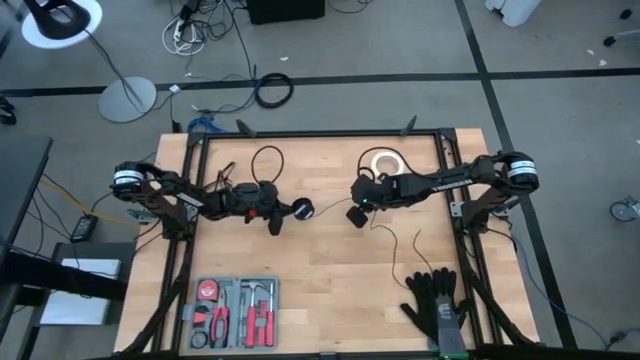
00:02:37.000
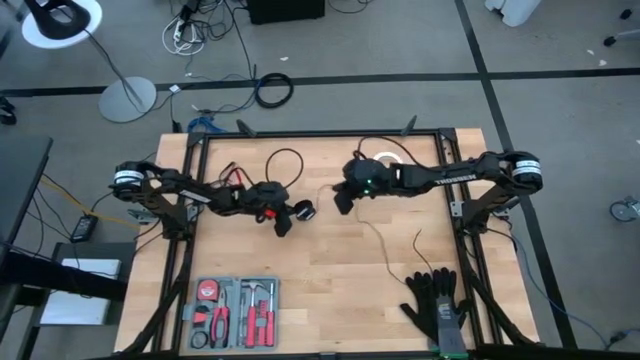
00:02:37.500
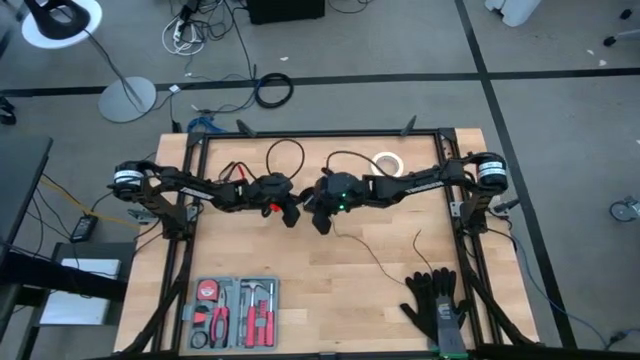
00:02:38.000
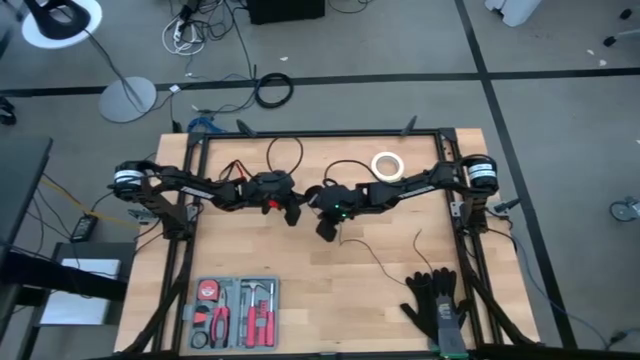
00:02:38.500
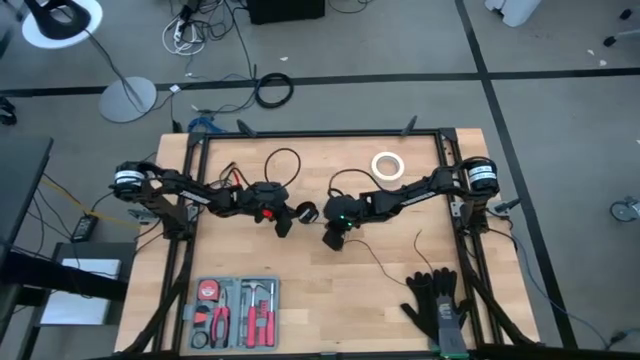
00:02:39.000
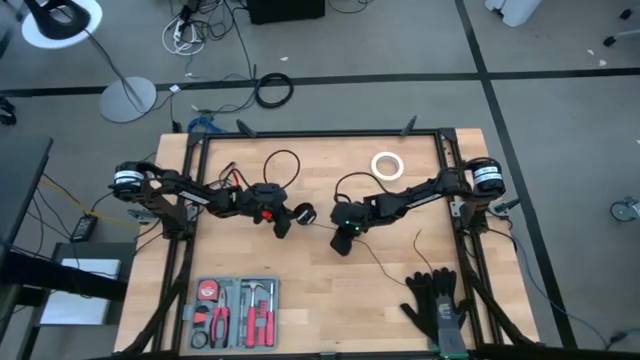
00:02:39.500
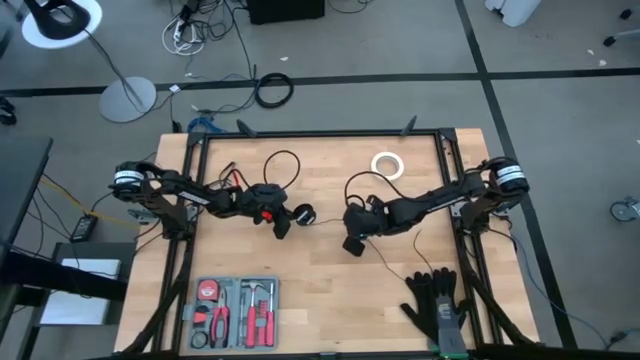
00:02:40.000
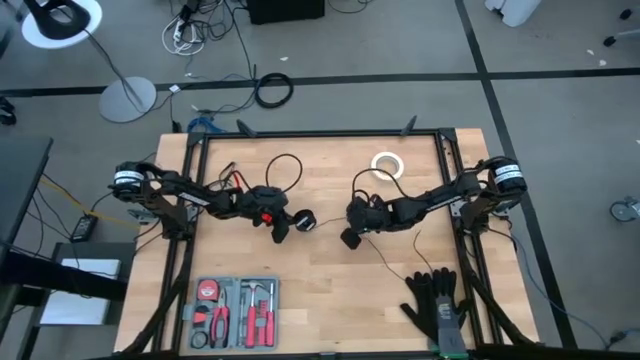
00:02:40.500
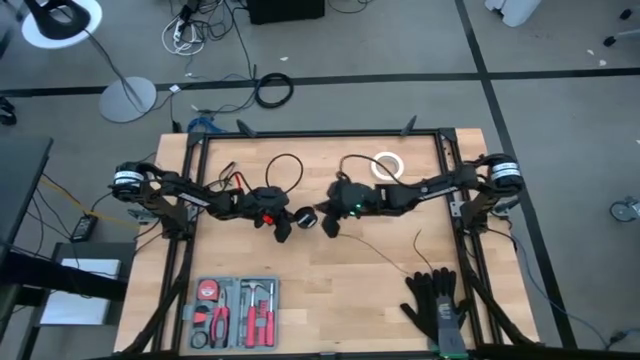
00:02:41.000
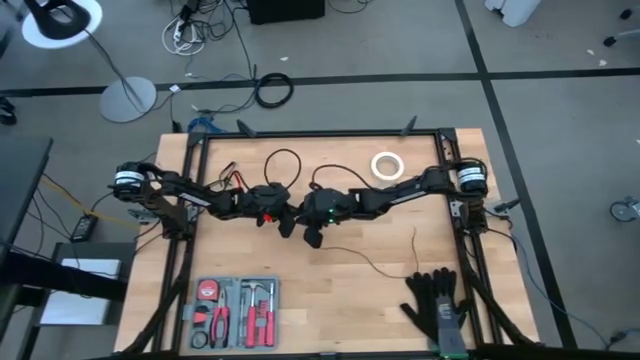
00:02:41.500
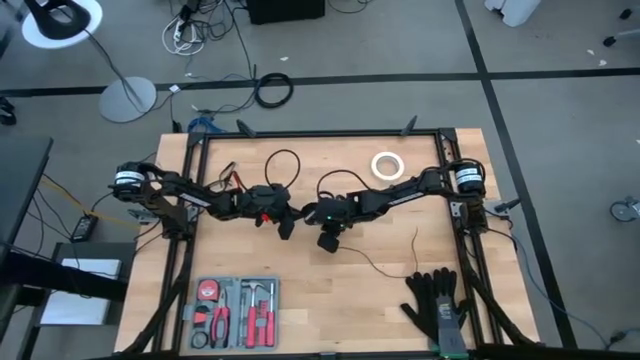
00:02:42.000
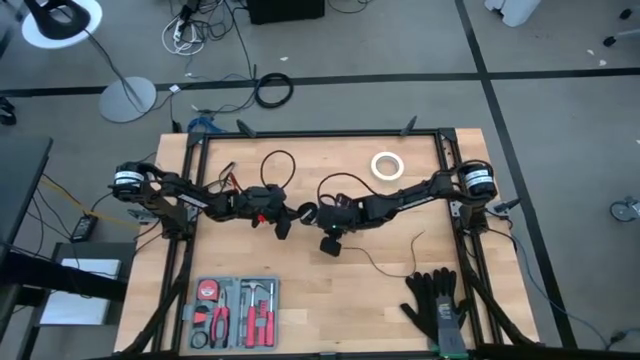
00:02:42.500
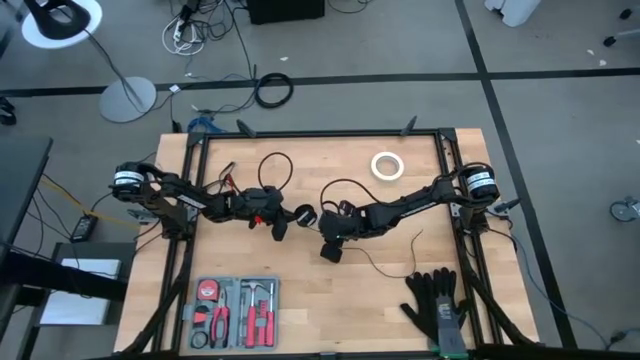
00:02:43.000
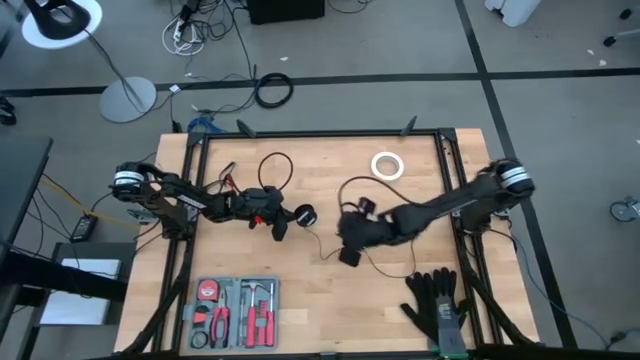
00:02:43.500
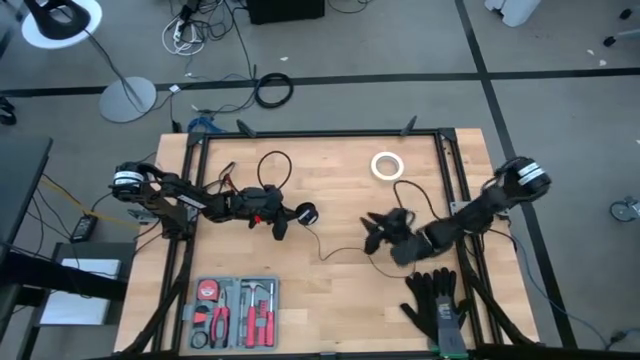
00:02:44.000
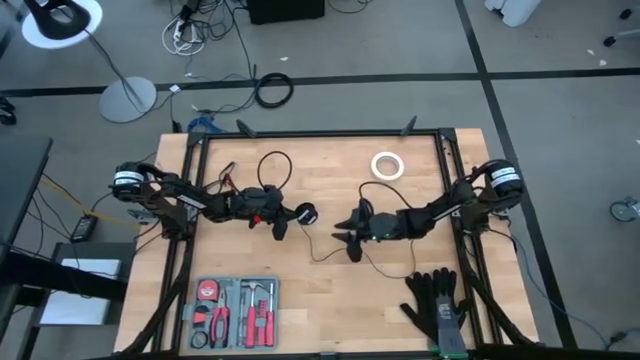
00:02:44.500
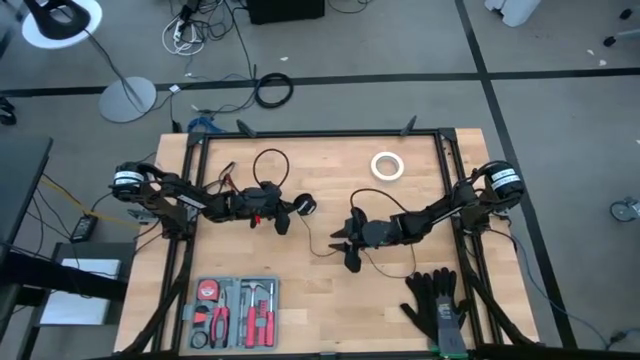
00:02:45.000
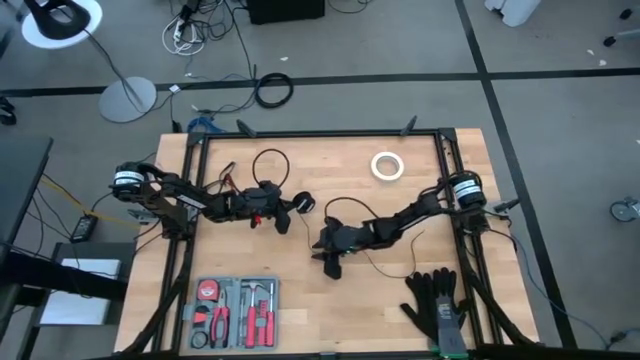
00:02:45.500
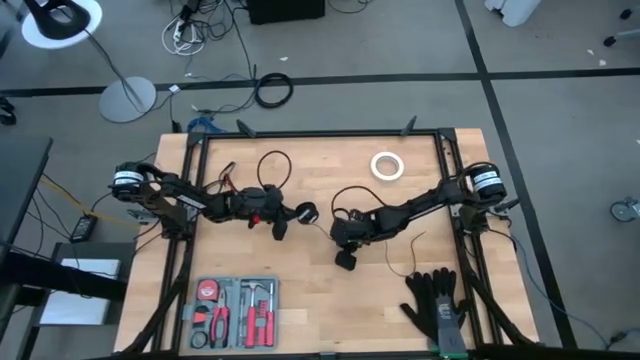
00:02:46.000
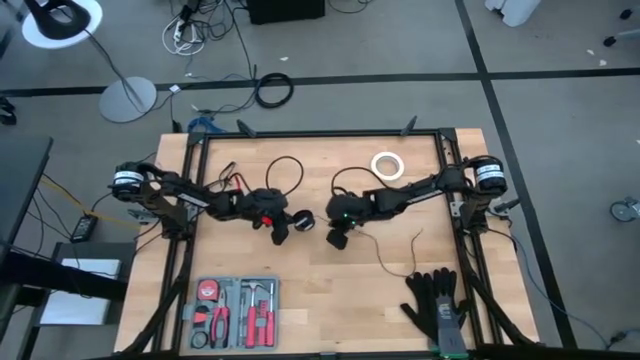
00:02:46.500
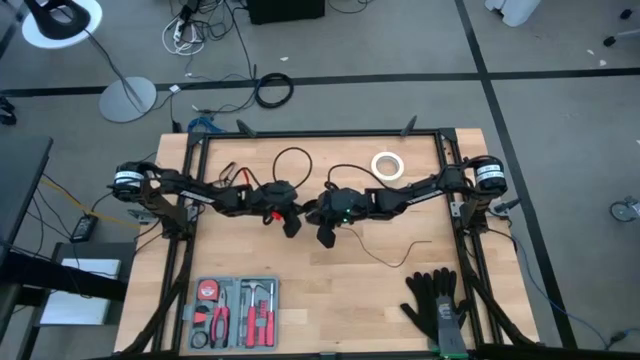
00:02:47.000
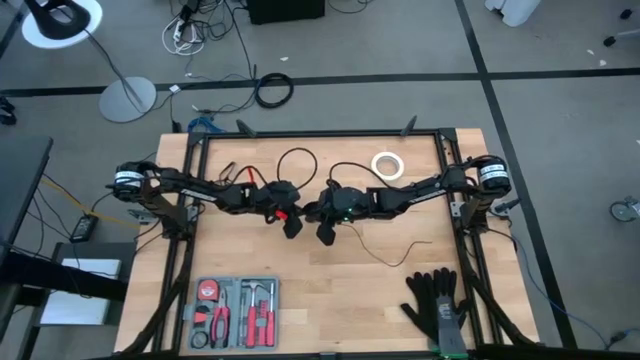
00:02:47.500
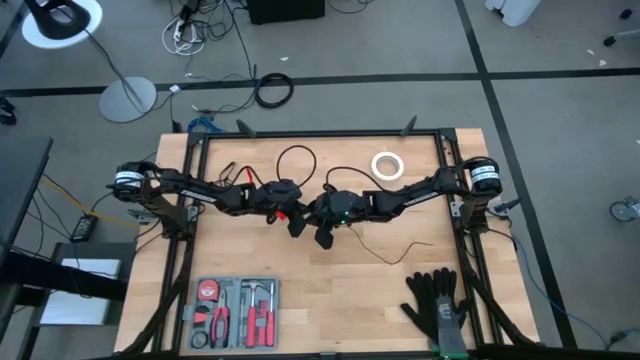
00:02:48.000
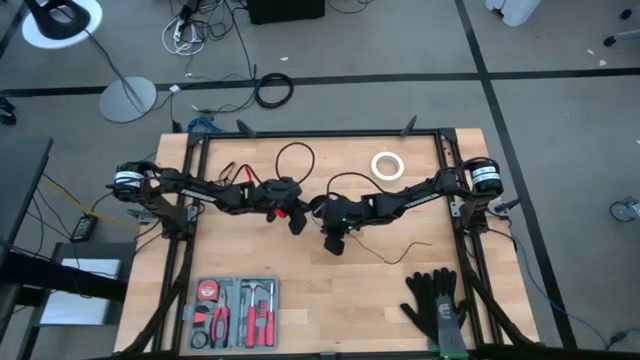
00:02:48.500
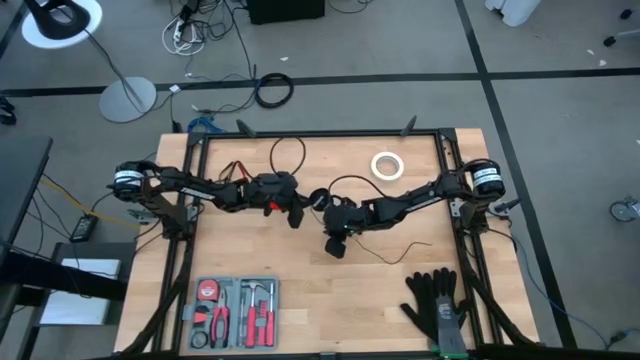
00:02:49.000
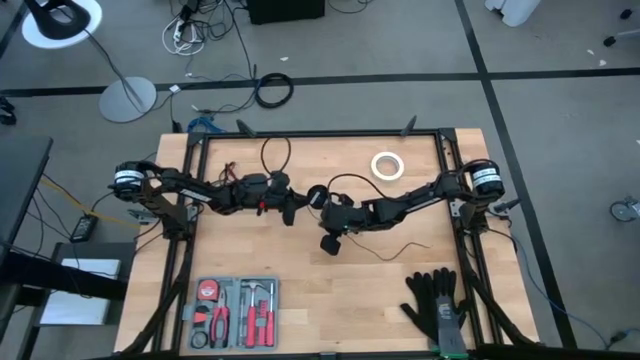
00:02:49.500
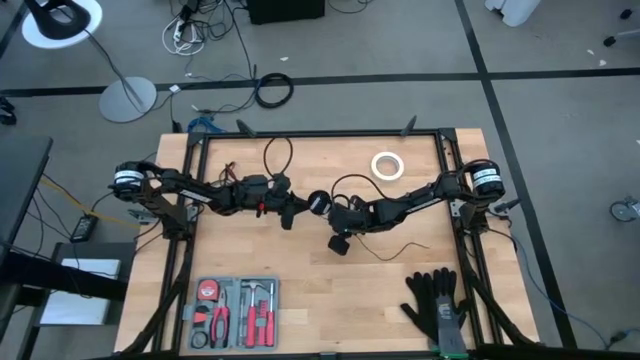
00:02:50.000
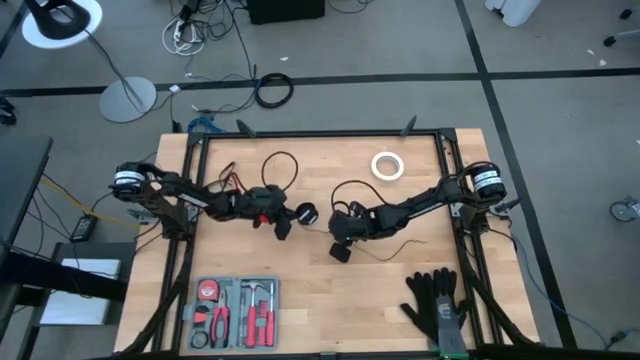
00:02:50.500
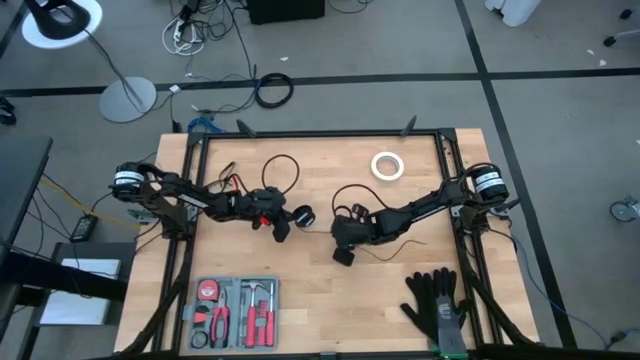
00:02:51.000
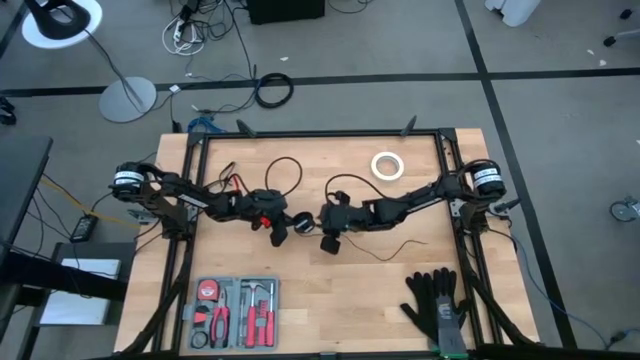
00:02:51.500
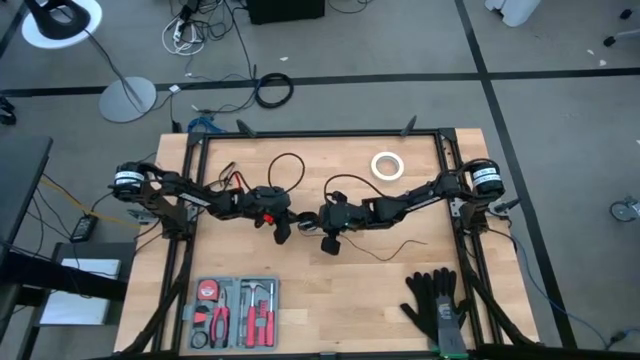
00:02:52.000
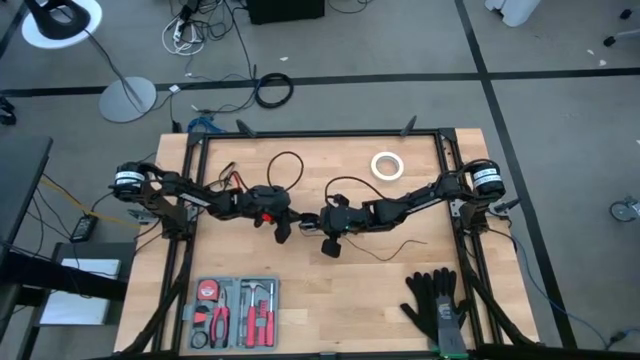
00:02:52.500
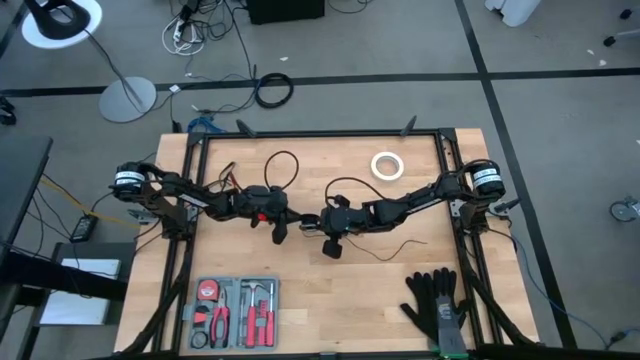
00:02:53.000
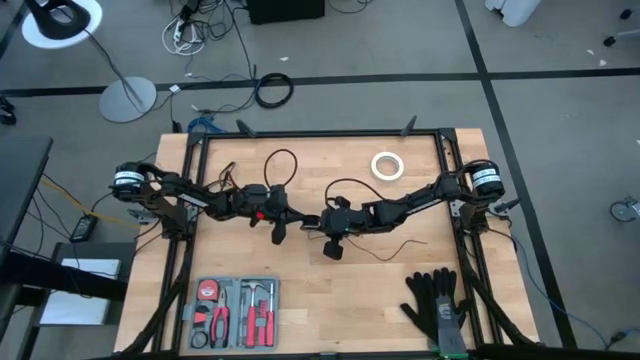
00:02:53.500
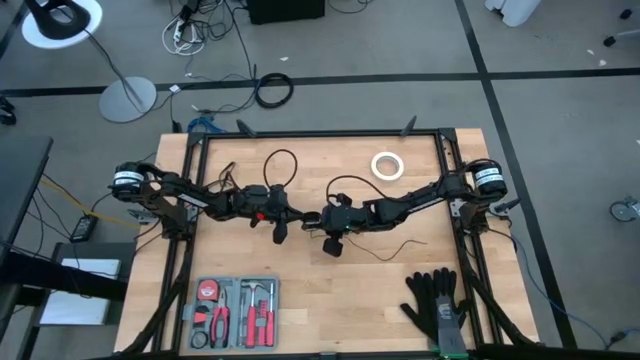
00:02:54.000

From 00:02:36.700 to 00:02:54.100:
Task: Coil cords
Coil the black wire on the black spool

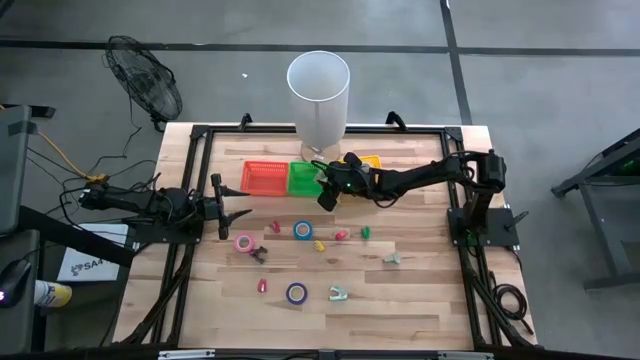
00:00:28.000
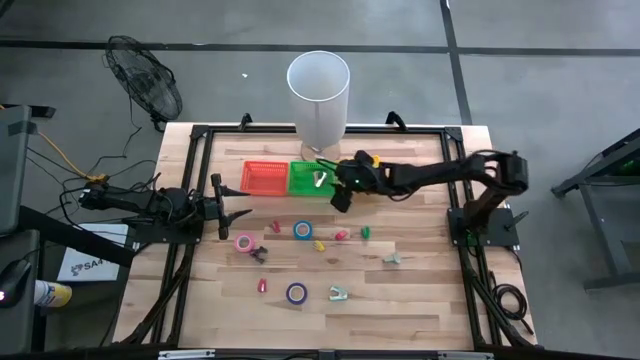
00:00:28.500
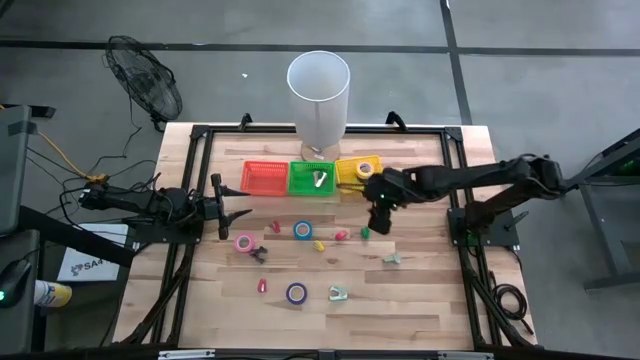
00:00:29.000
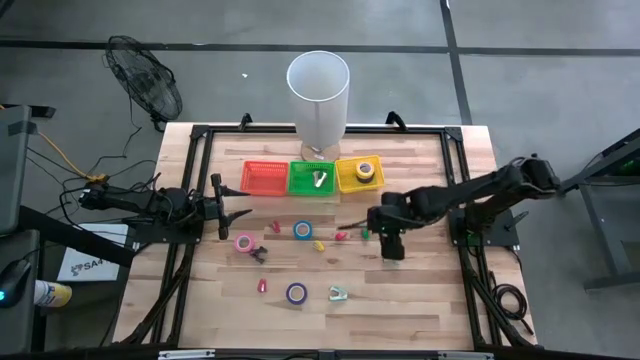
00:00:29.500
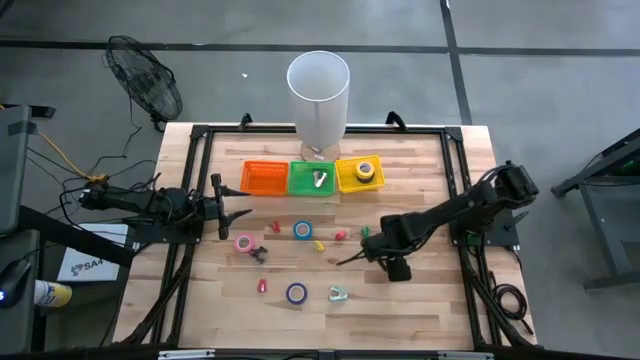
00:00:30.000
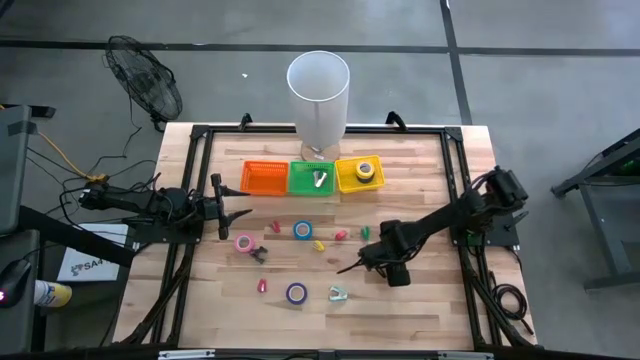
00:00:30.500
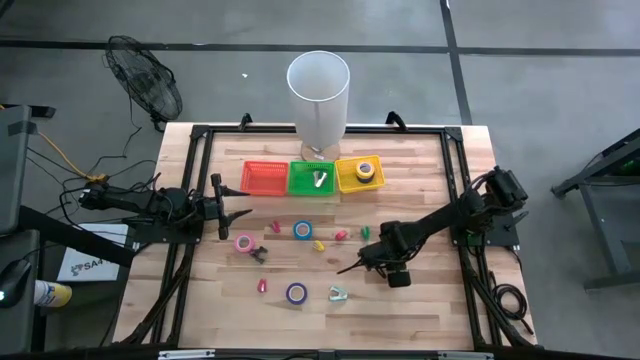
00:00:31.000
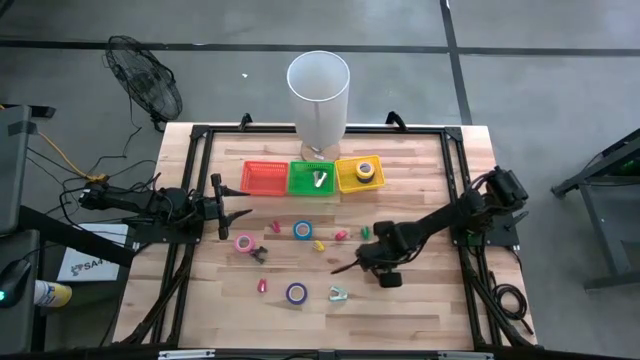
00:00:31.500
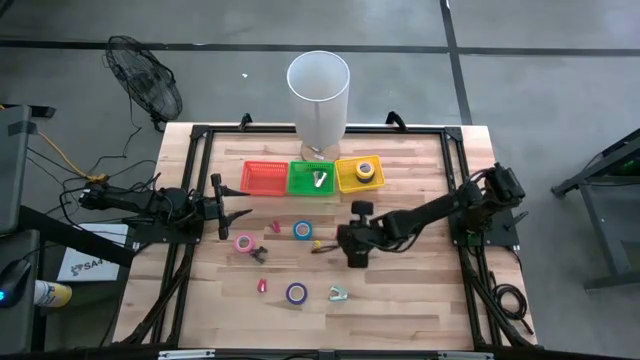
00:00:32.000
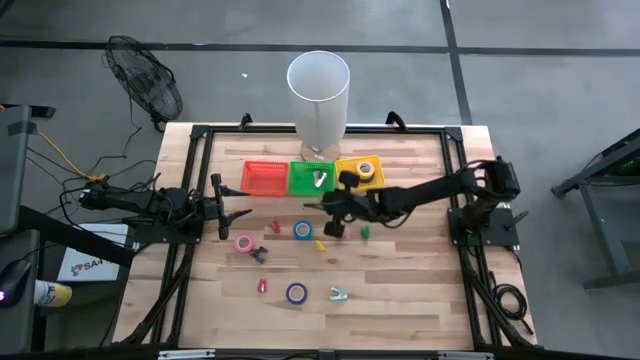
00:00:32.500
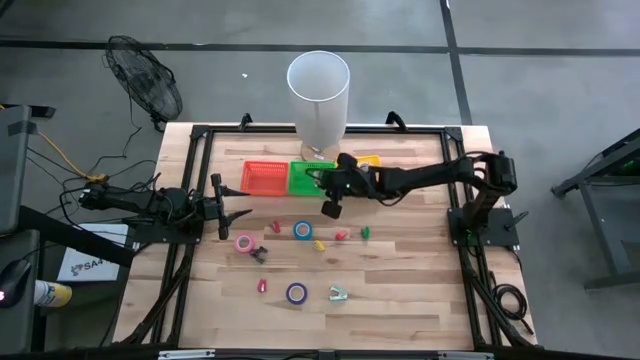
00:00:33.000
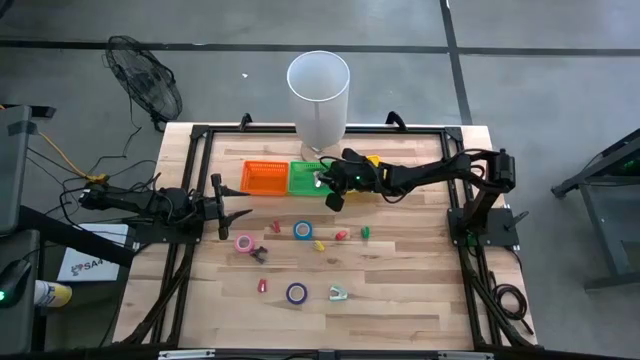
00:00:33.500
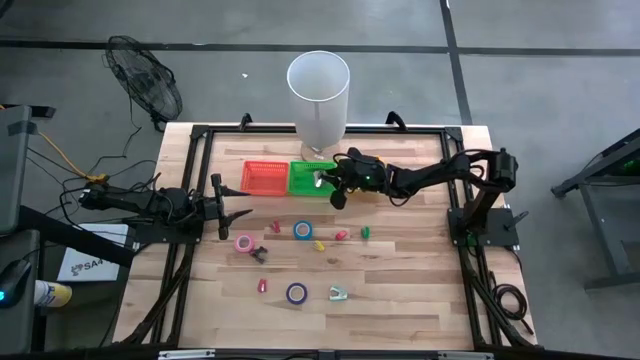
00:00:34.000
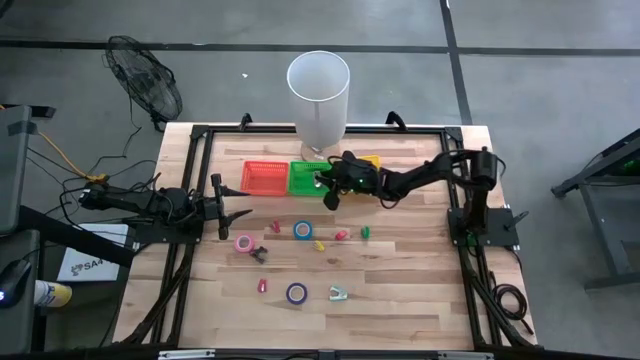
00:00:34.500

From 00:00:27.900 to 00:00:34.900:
Task: Pick and place Stapler, Stapler remover, tape
Put the gray staple remover into the green bin
